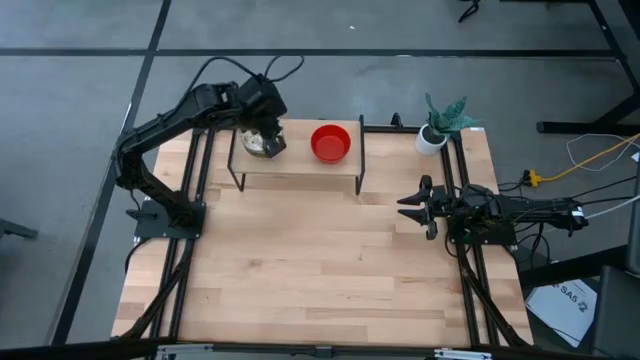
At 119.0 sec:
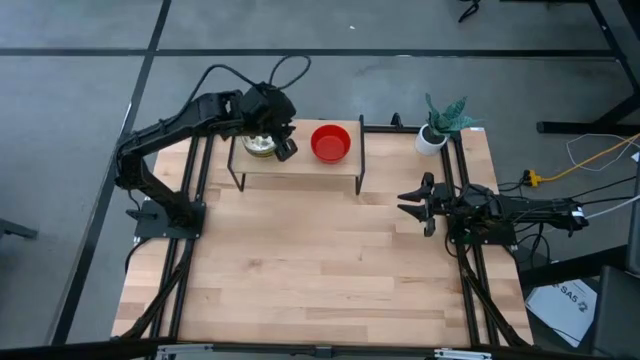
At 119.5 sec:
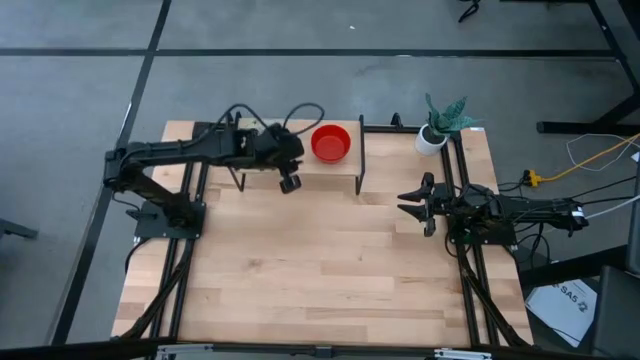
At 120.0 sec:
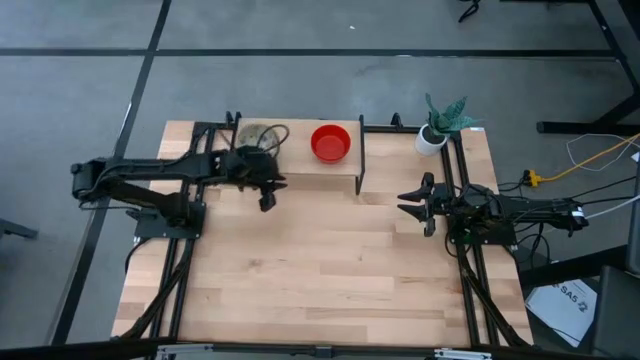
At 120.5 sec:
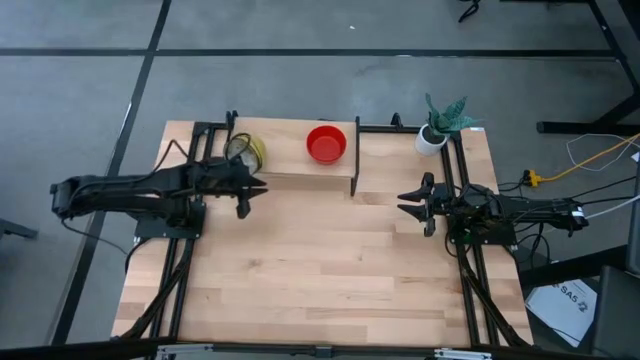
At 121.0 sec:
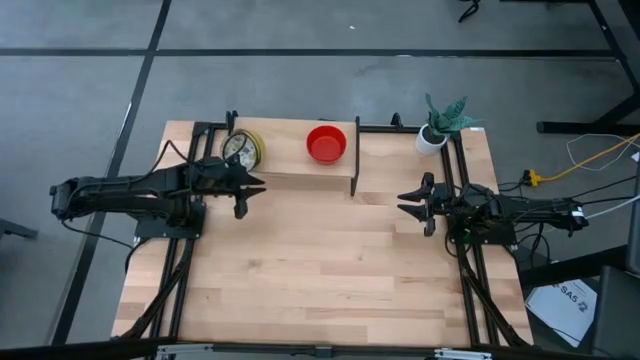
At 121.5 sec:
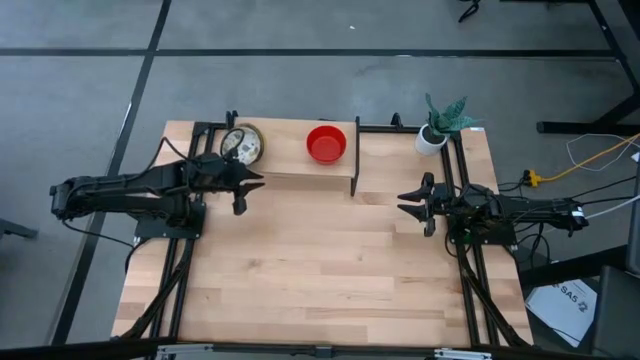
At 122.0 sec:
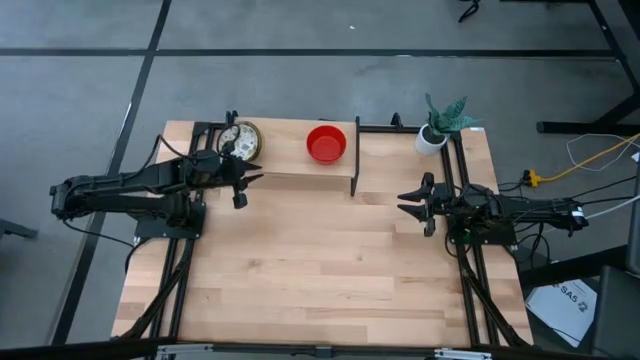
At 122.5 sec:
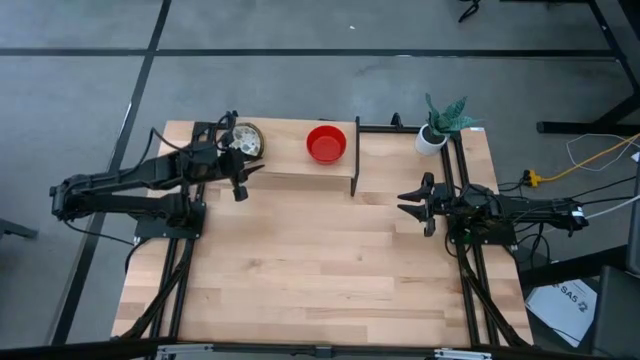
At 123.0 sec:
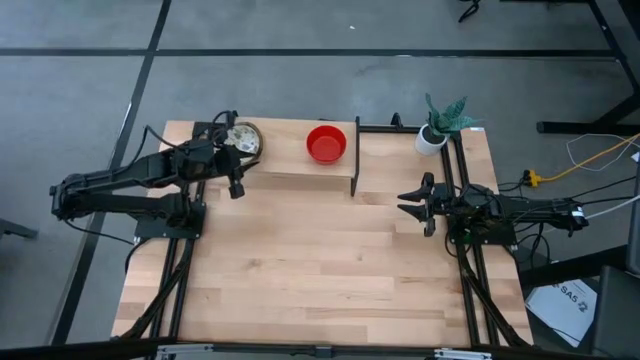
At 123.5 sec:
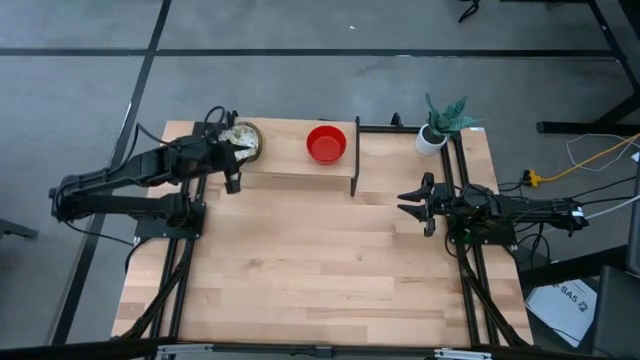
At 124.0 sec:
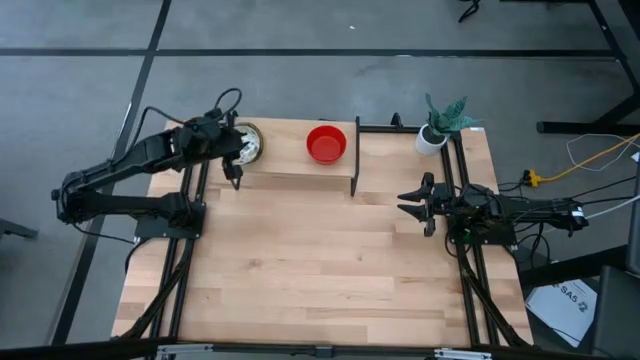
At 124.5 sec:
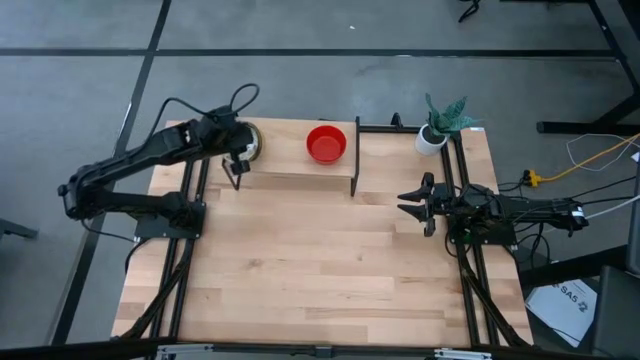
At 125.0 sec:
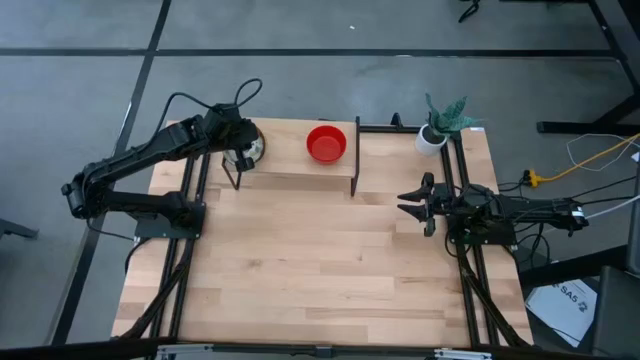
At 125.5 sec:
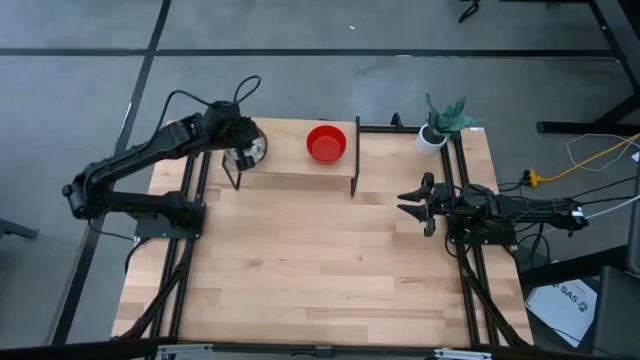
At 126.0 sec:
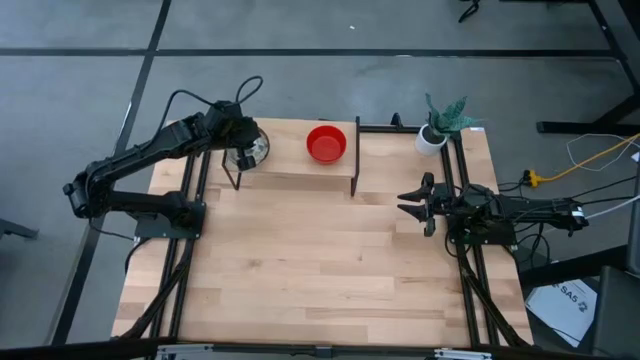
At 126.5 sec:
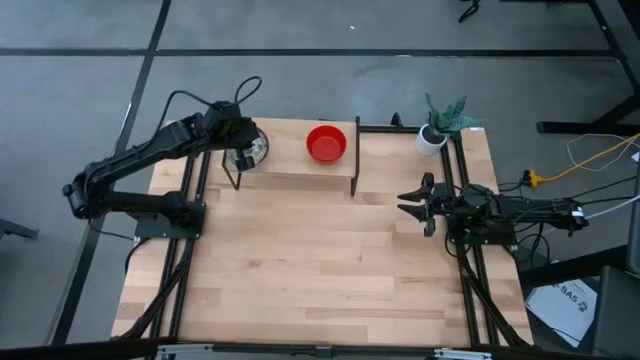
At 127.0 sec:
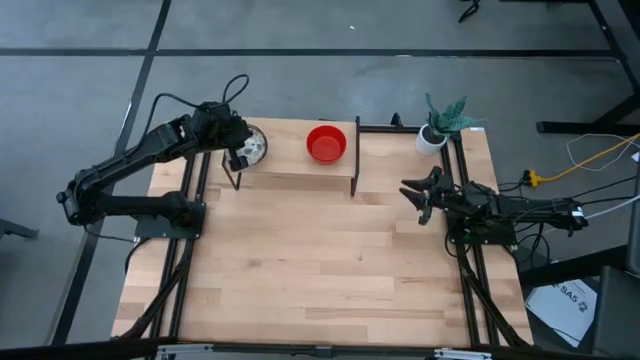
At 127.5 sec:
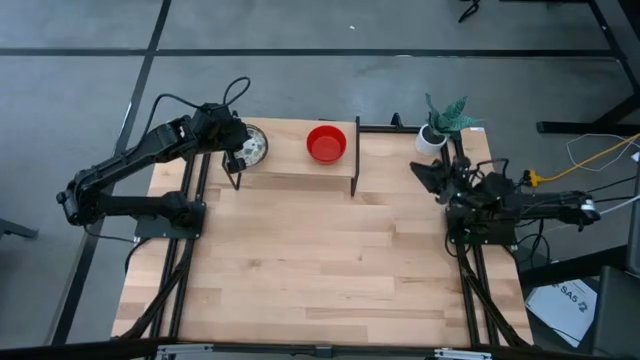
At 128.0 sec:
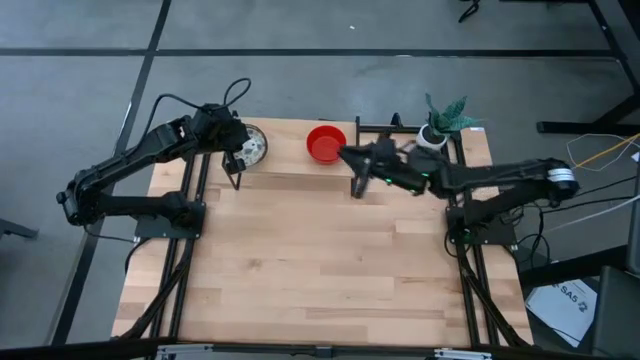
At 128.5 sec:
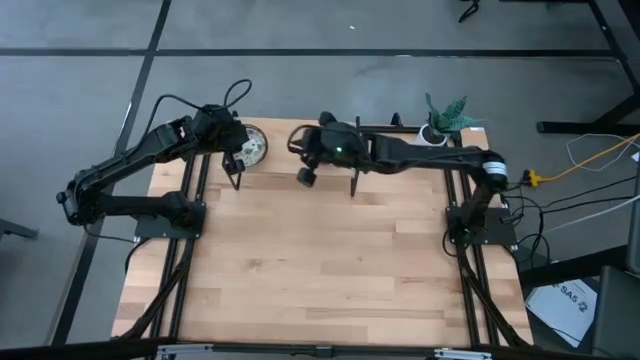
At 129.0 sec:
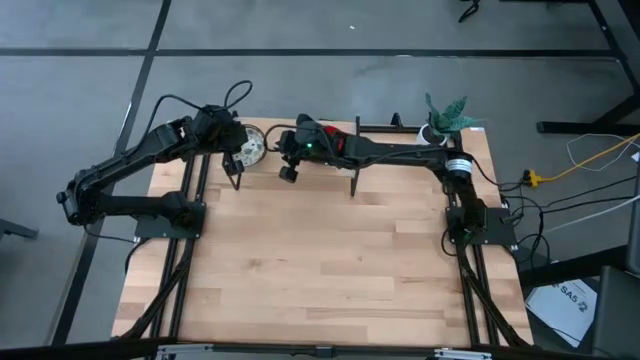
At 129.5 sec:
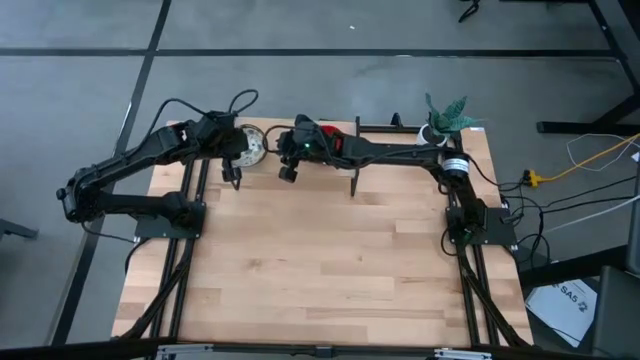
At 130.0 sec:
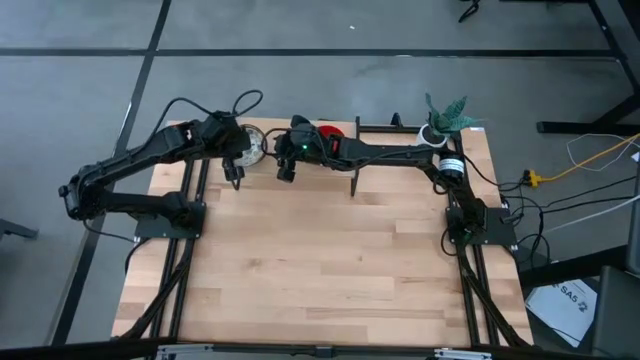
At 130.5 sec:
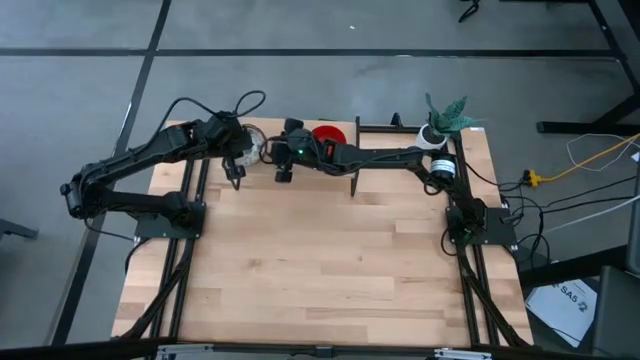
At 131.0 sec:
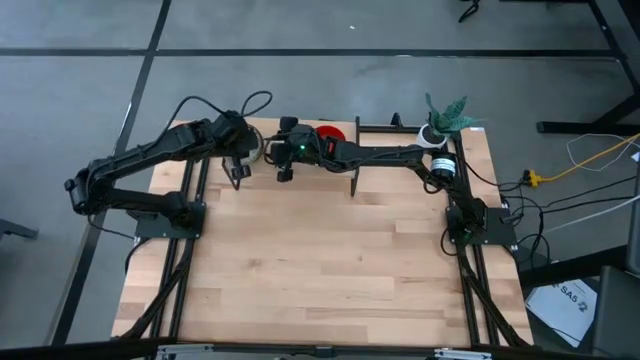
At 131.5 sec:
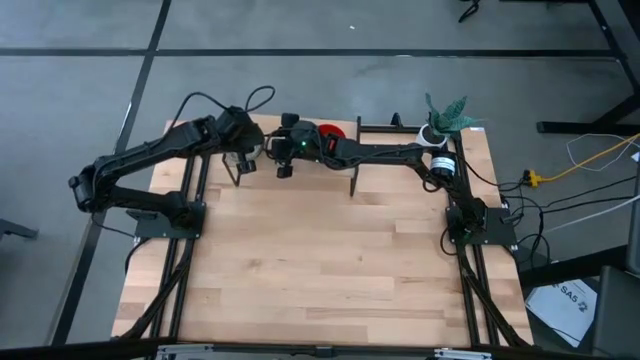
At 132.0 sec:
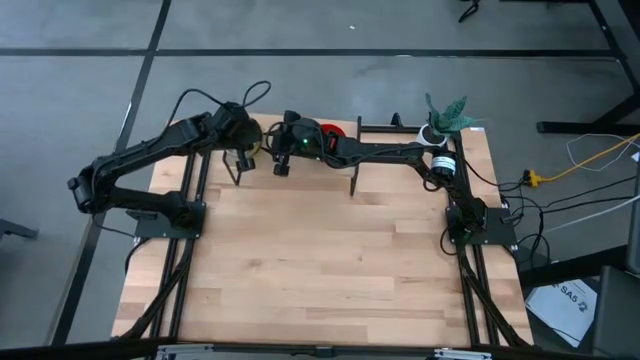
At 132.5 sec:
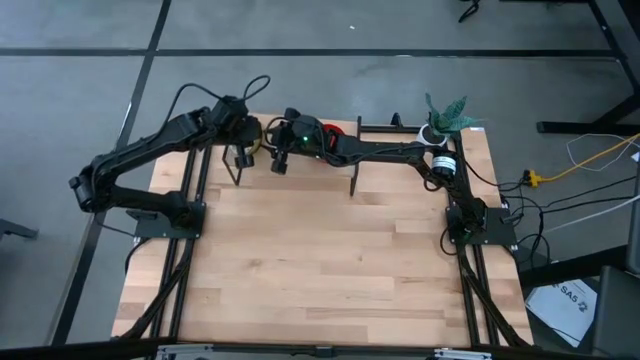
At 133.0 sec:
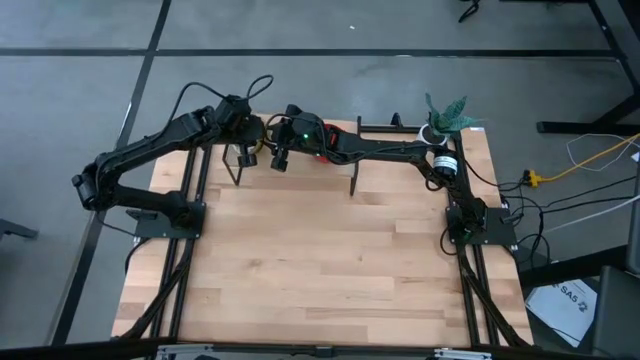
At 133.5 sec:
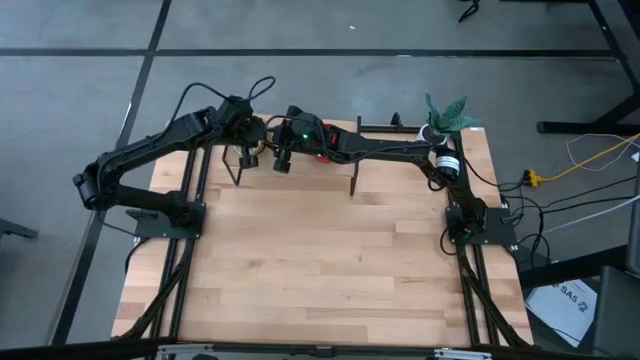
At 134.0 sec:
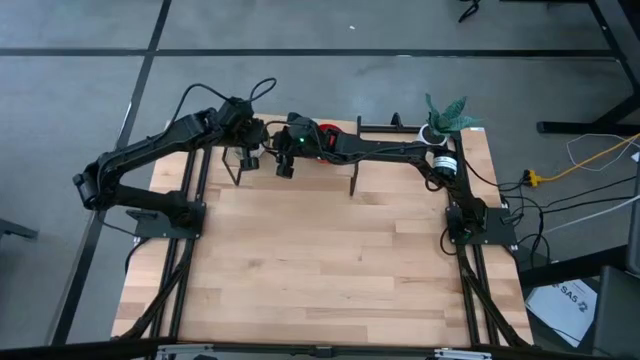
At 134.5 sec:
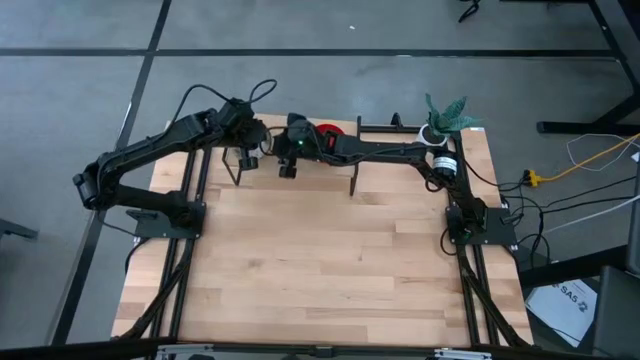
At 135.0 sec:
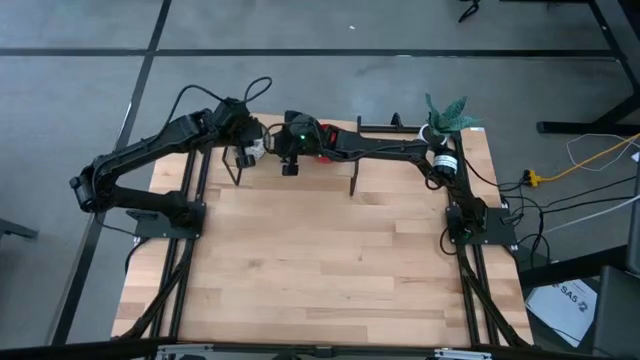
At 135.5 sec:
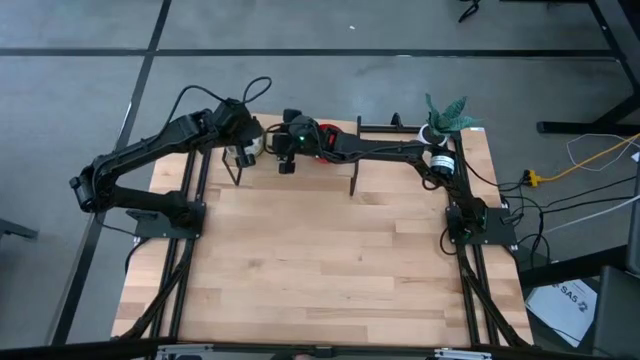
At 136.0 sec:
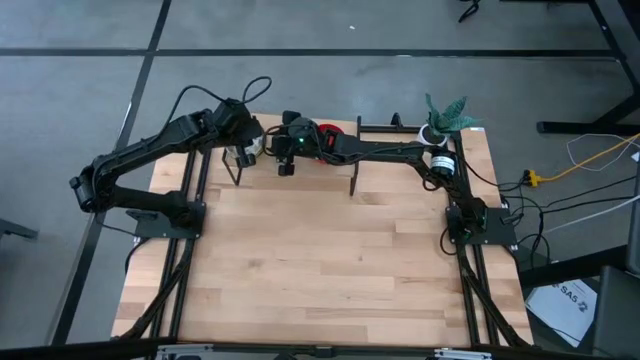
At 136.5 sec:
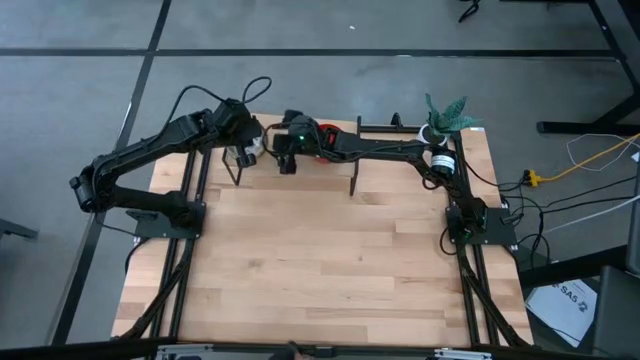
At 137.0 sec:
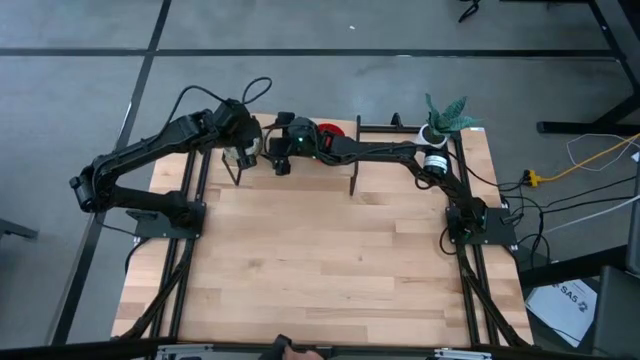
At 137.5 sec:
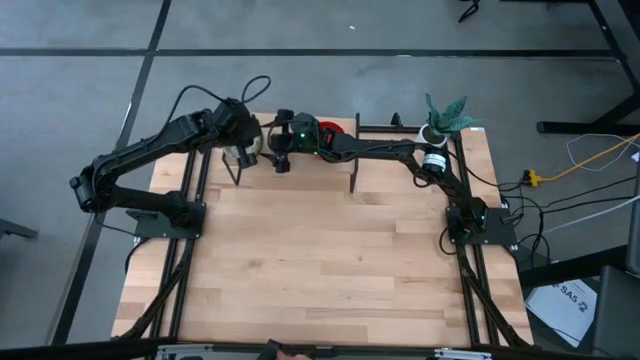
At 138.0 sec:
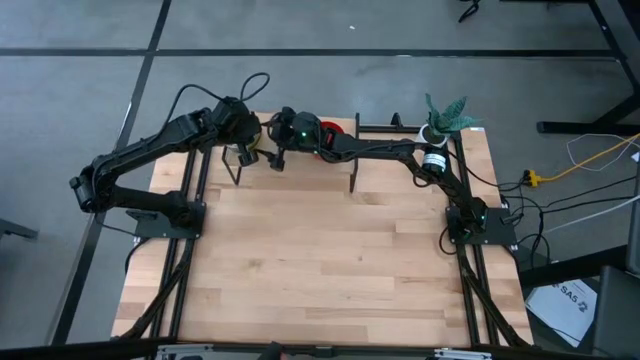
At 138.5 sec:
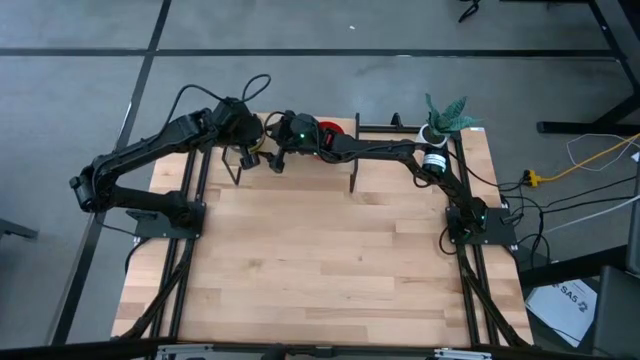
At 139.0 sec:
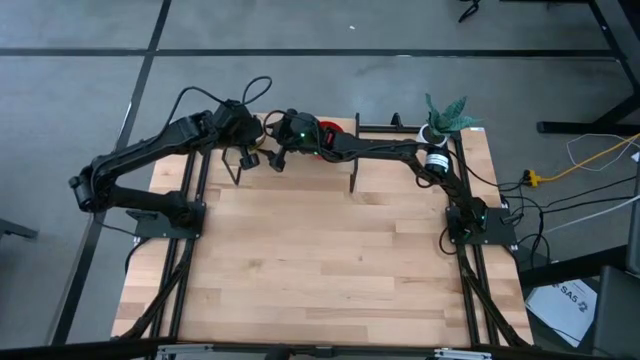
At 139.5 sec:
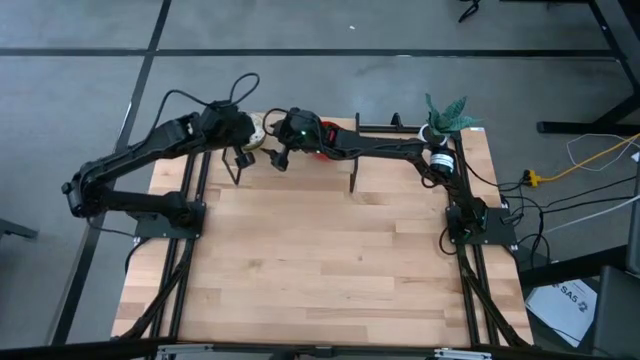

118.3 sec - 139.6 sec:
Task: Pick & Place Mini bowls
Adjust the white patterned bowls on the shelf
